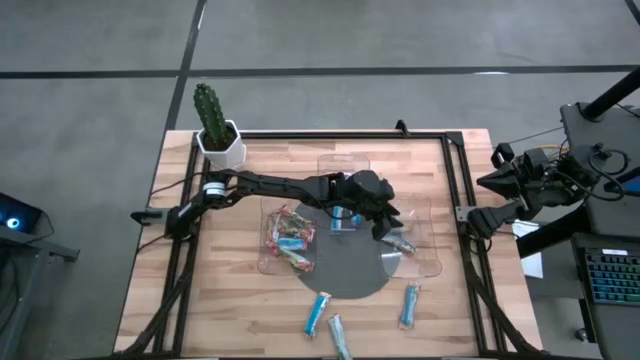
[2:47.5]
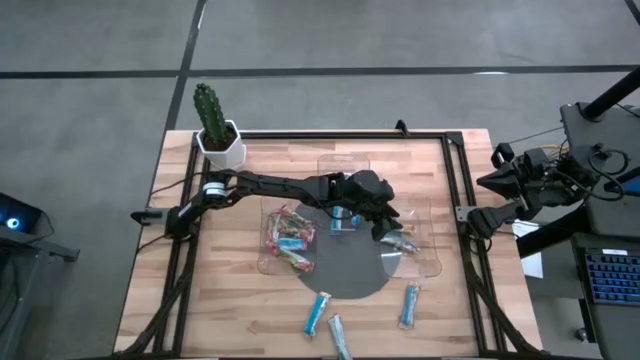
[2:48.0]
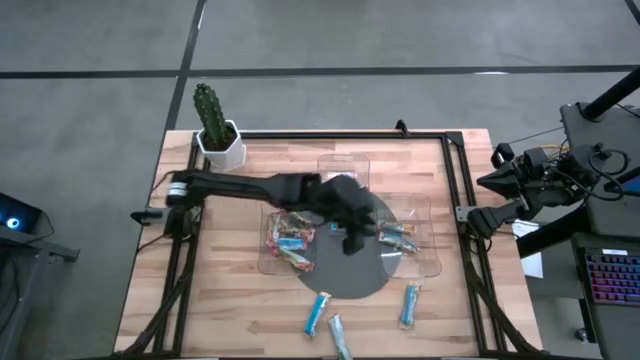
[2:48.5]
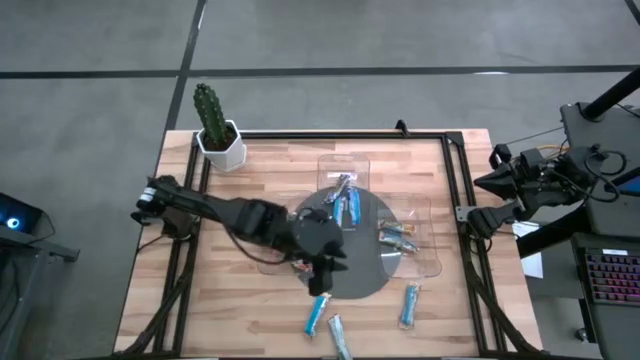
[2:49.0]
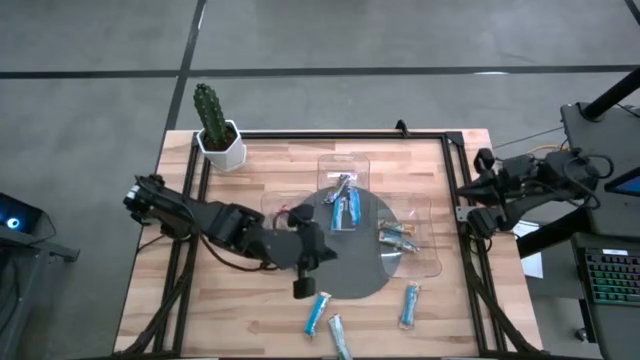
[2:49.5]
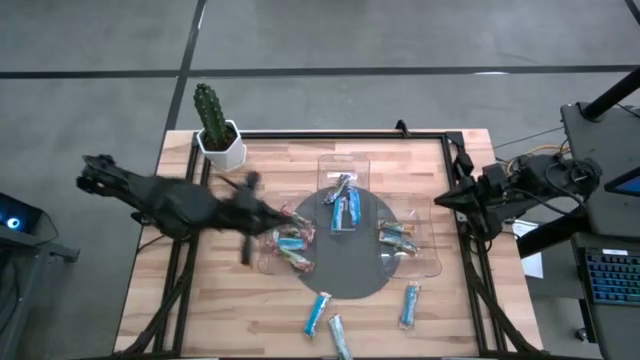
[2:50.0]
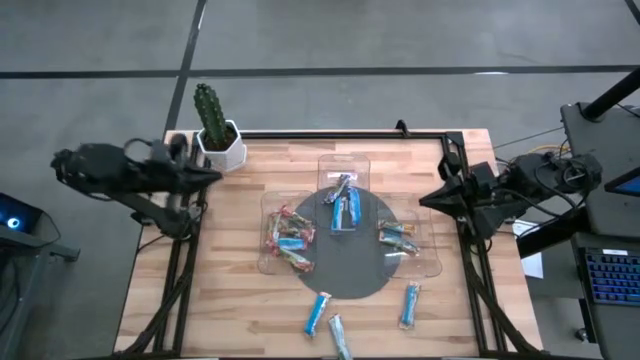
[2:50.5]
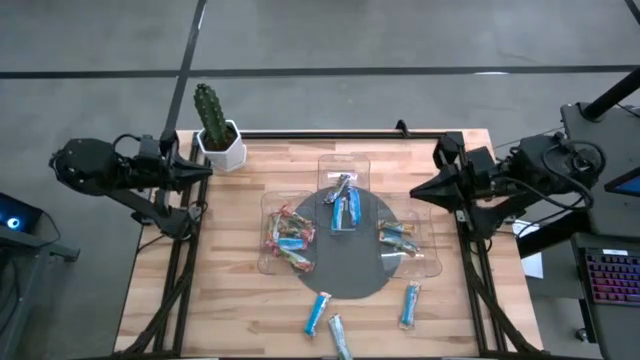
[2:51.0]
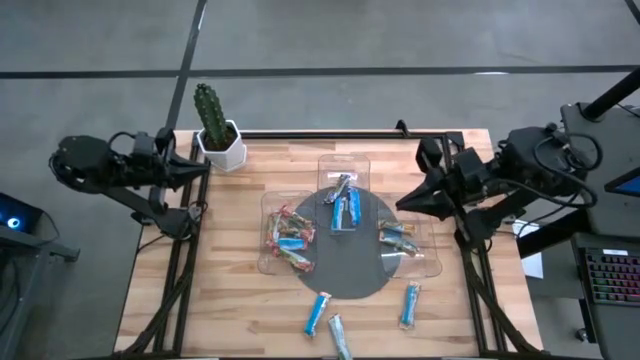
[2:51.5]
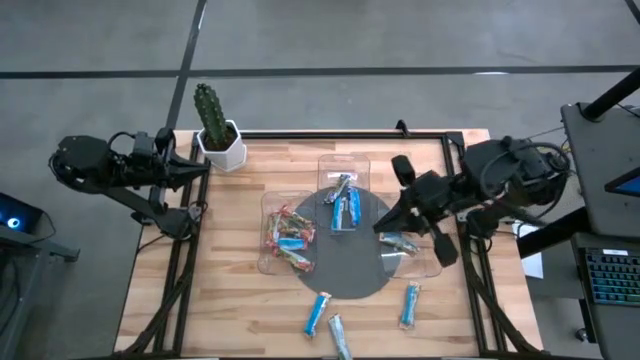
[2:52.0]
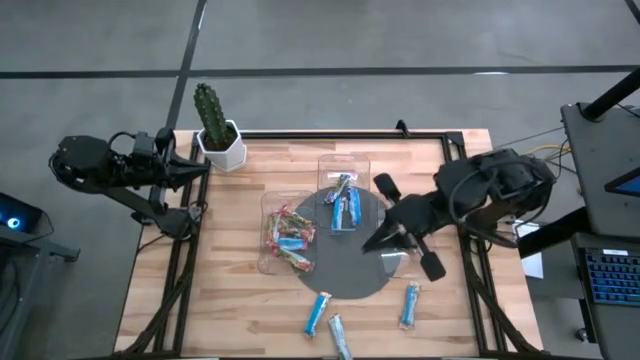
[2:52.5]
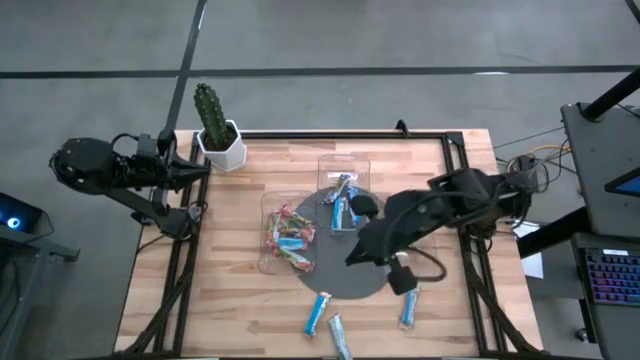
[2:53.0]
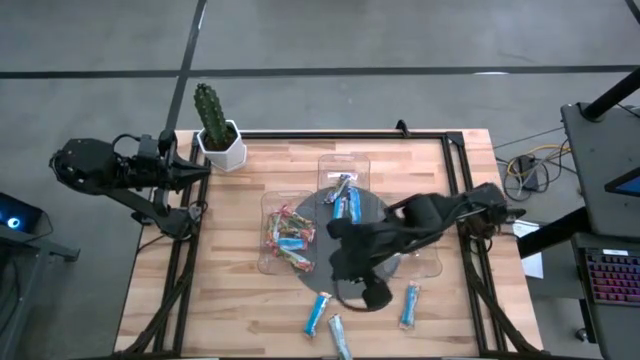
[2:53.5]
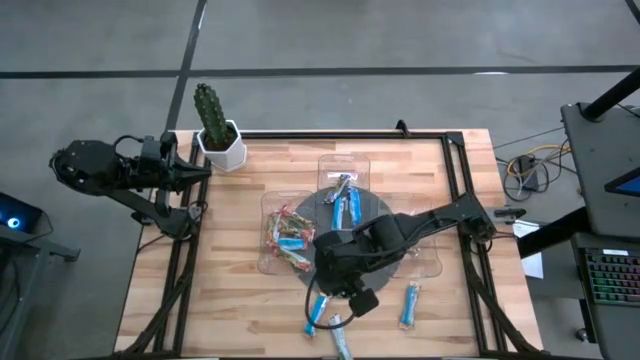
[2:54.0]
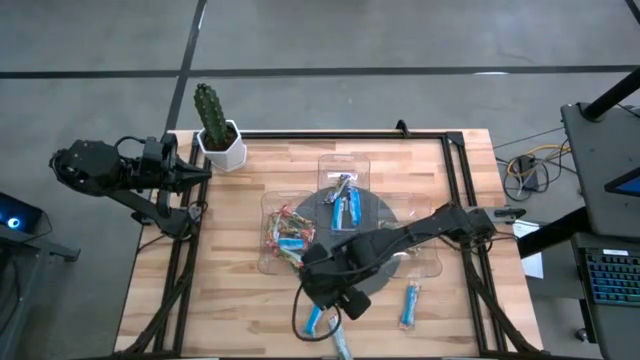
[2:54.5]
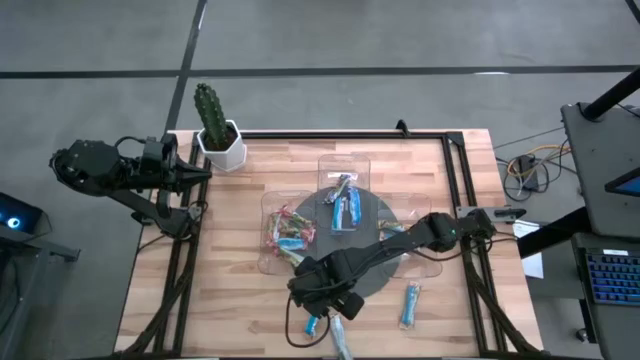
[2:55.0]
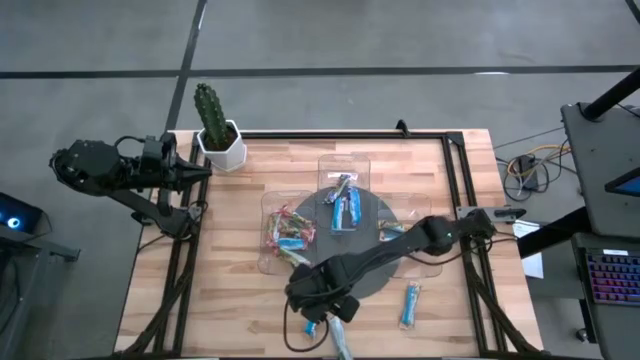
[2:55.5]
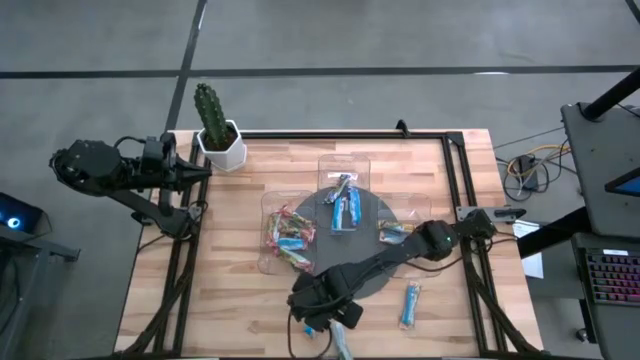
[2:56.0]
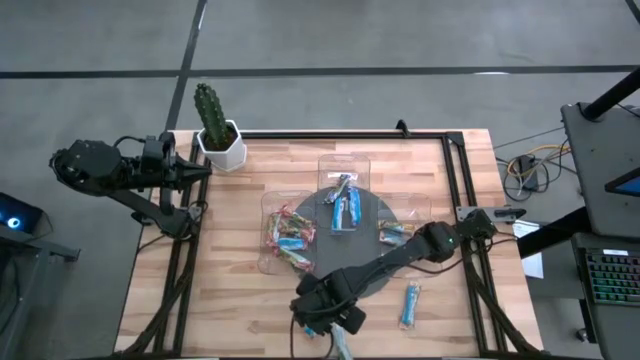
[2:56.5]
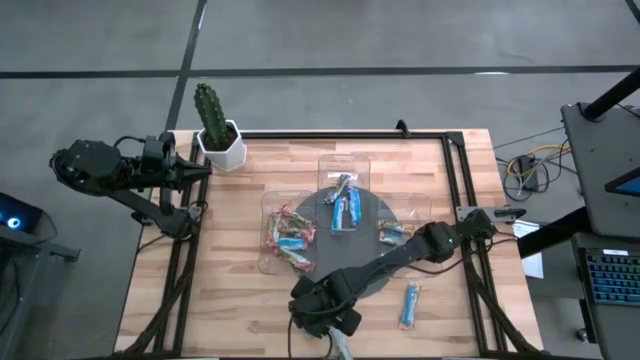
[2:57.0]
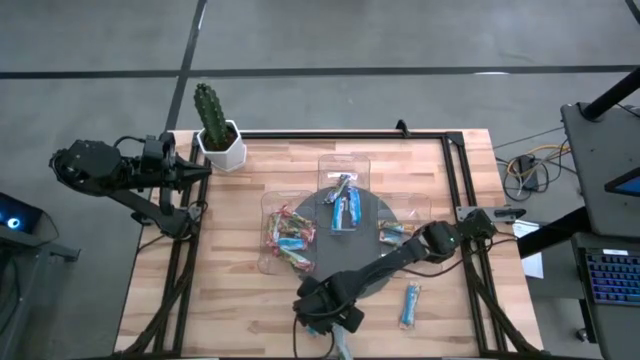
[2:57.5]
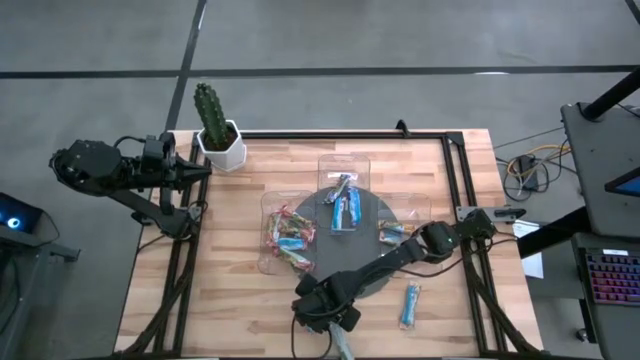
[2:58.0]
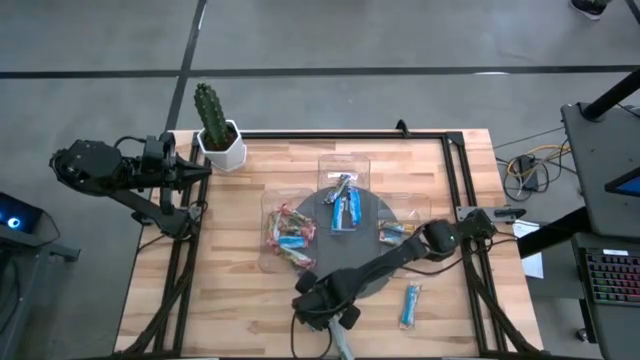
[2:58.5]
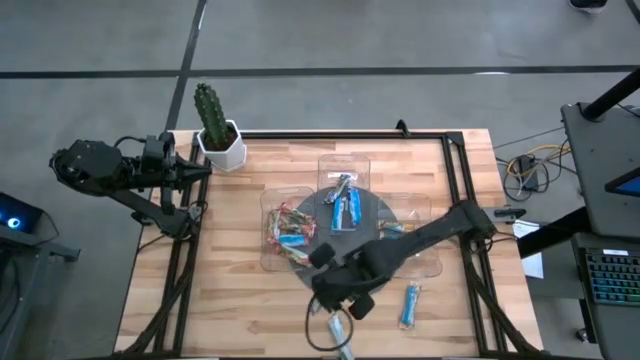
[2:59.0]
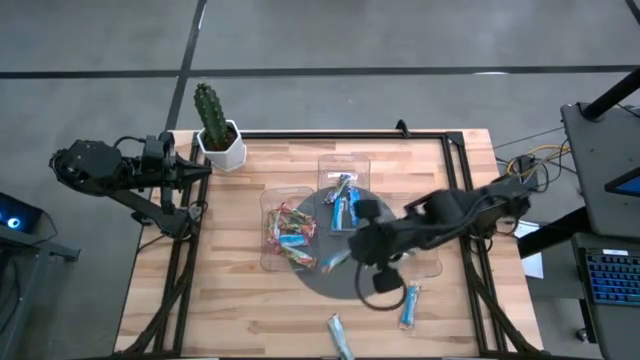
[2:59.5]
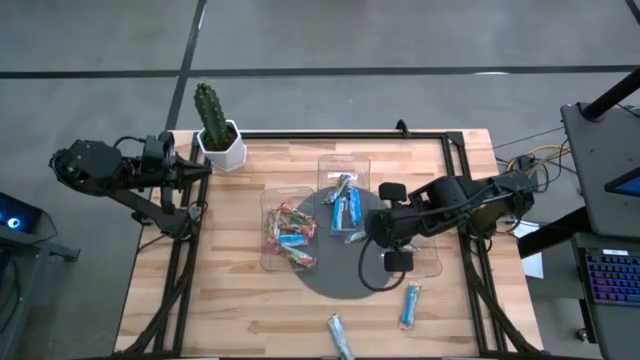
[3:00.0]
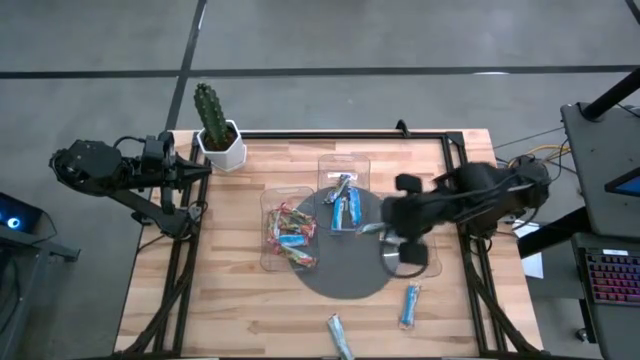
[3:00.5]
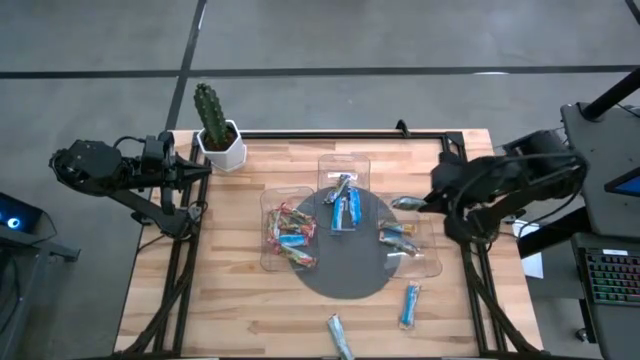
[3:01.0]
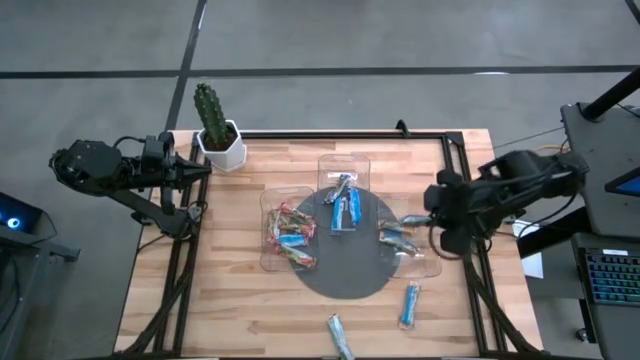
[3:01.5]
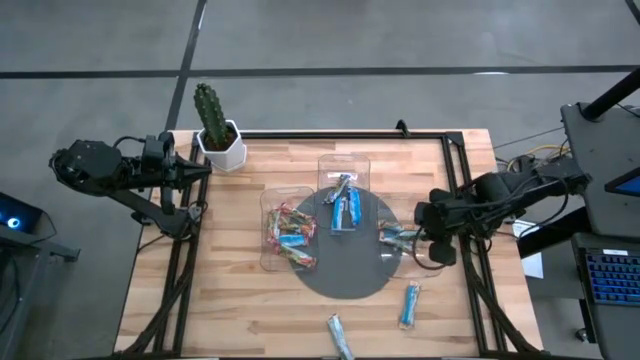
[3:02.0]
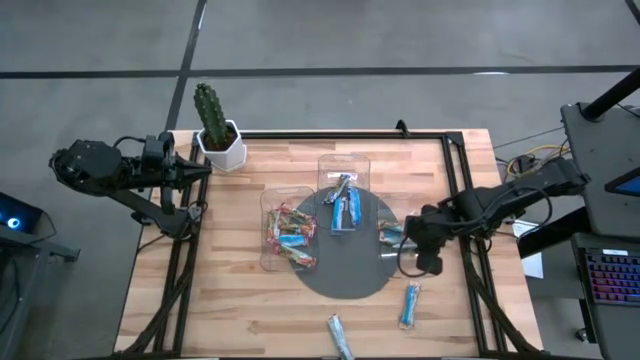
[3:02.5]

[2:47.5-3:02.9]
Task: Pick and place Granola Bars by type
Put the yellow granola bar into the right transparent bin

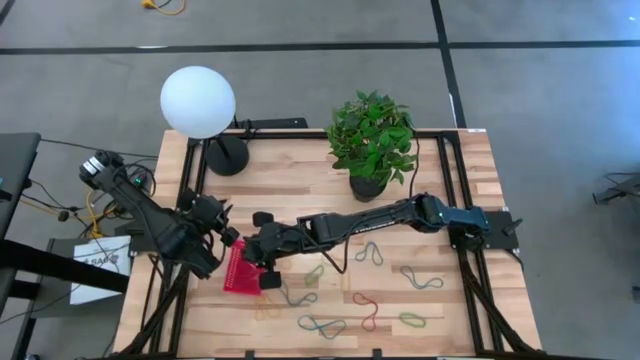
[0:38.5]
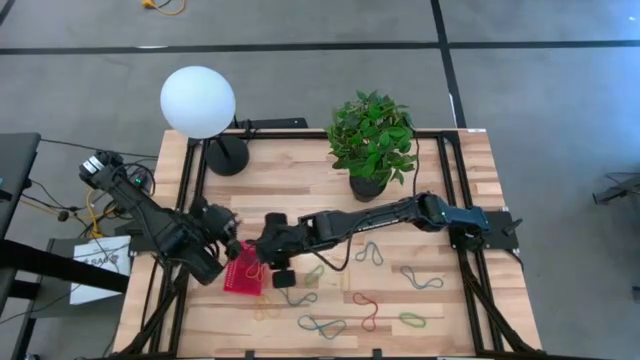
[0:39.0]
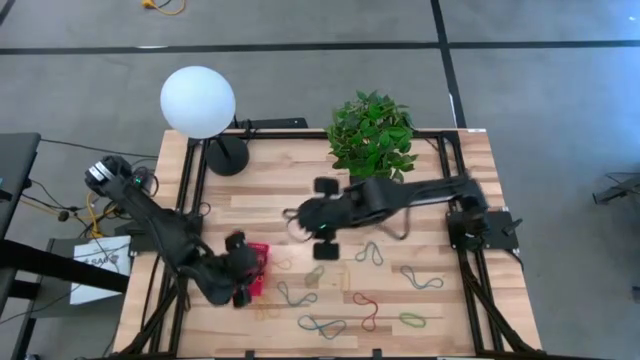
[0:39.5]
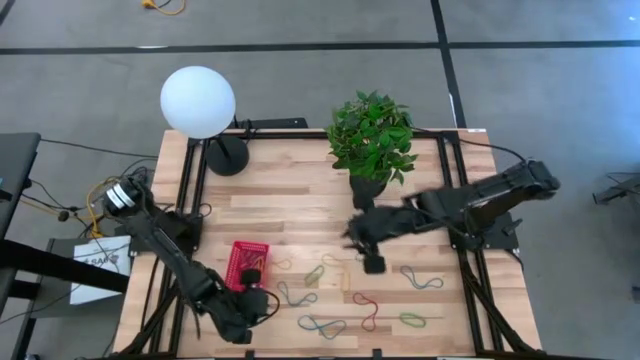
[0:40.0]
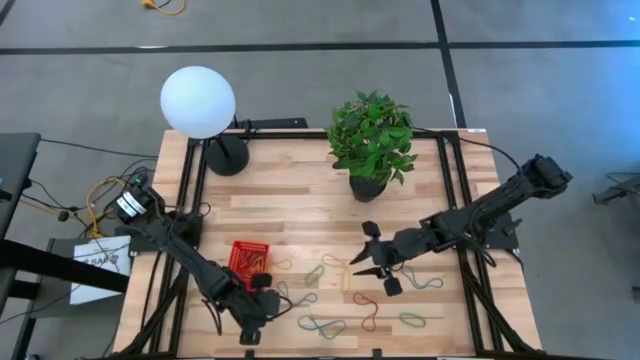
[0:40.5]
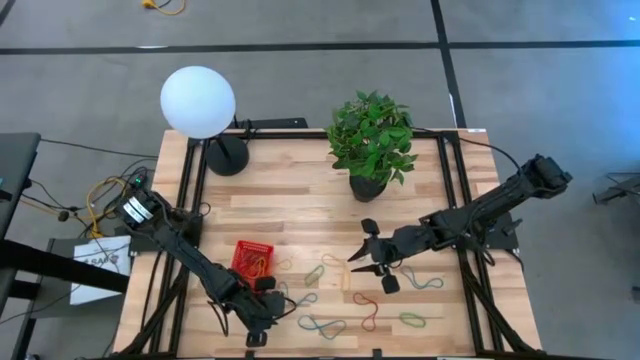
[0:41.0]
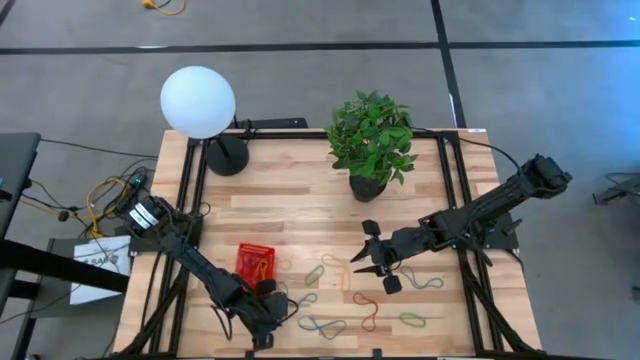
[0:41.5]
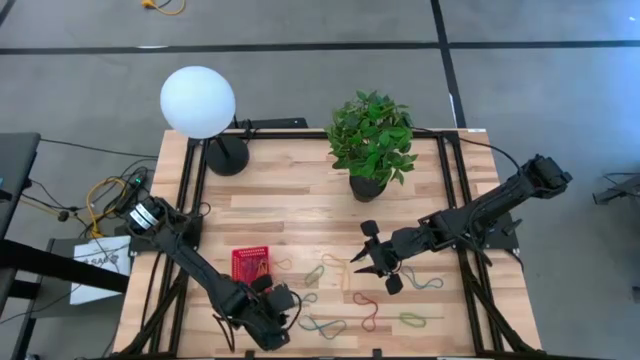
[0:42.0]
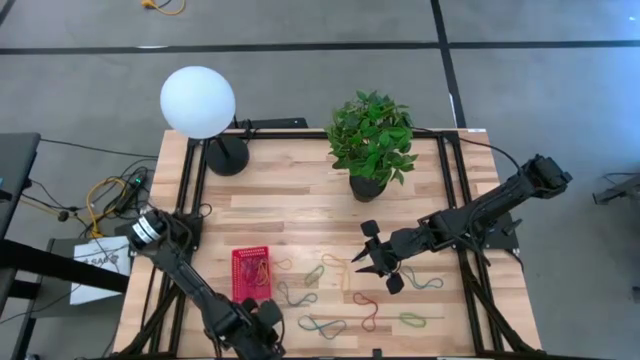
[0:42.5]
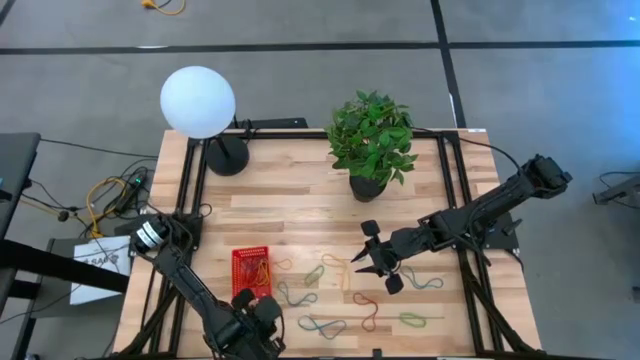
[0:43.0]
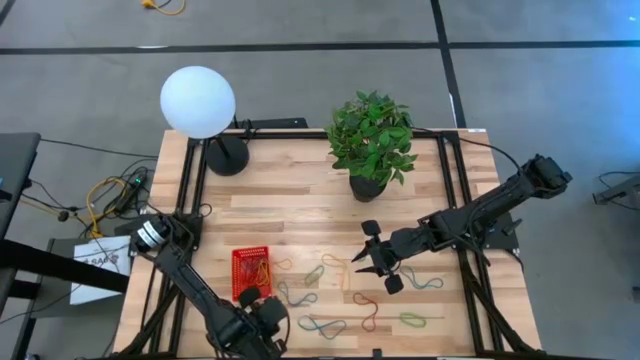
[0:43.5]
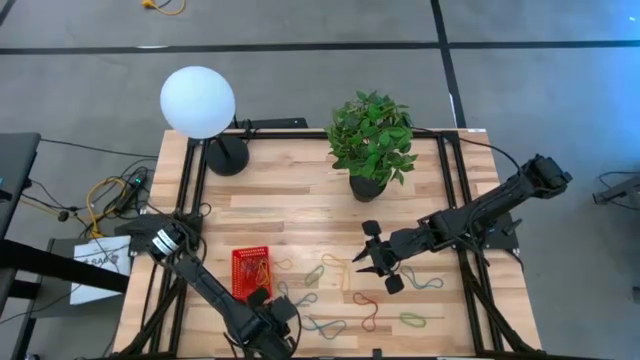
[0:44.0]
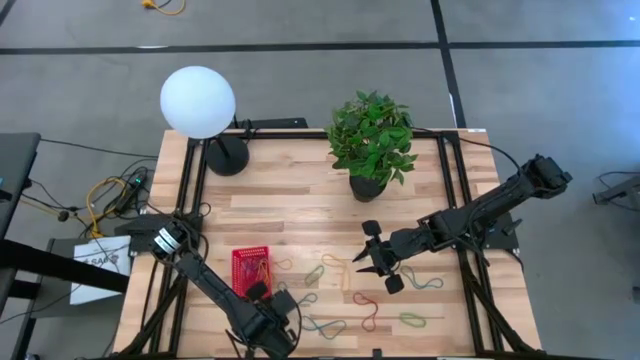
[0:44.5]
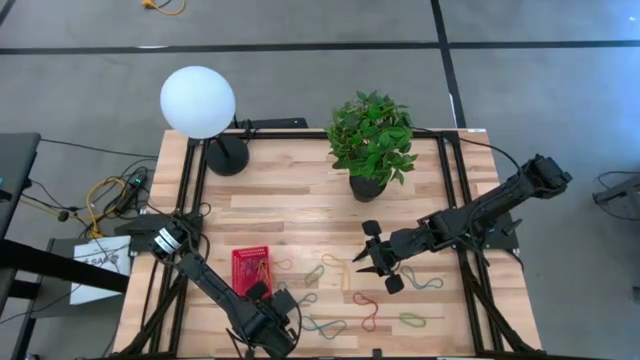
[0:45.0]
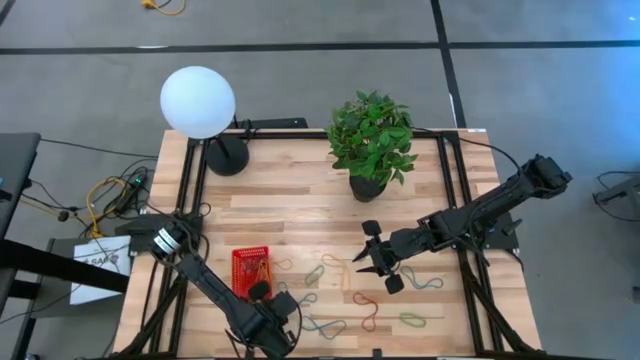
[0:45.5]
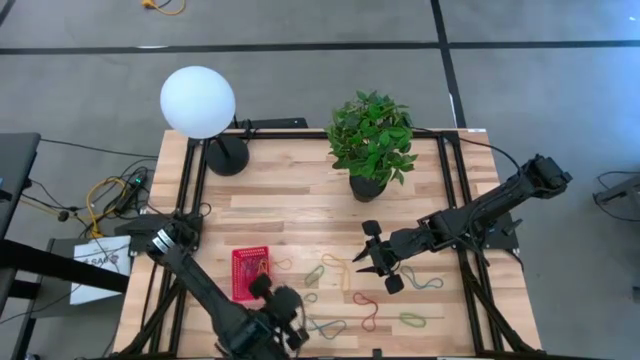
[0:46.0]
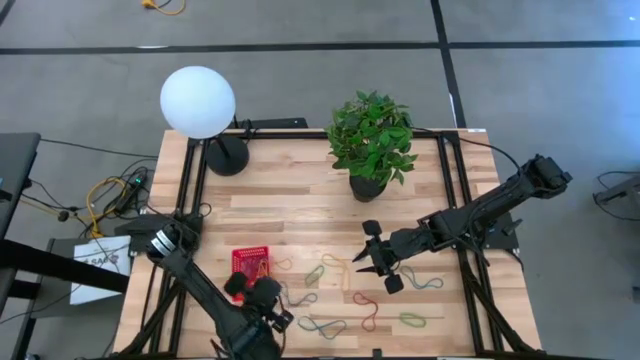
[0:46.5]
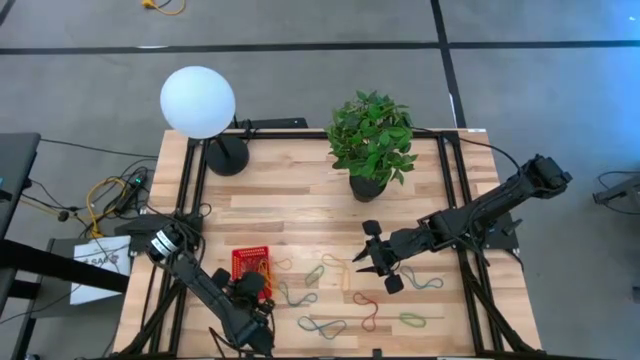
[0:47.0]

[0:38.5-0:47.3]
Task: Pick and place items into bin
Put the yellow rubber band into the red bin
